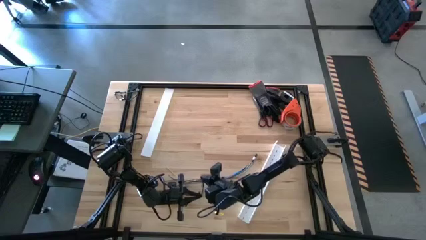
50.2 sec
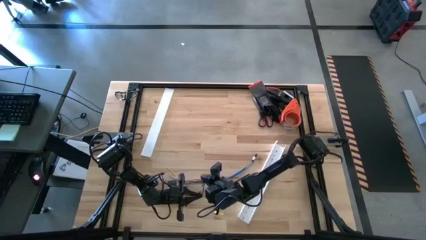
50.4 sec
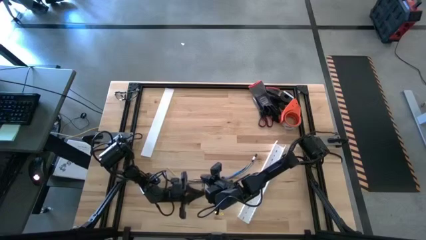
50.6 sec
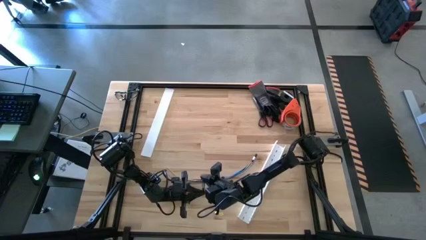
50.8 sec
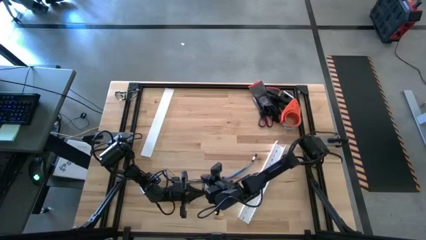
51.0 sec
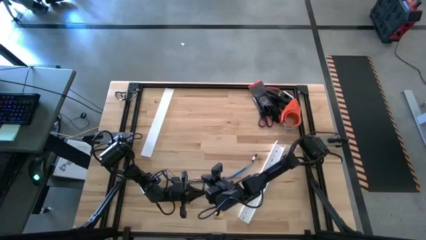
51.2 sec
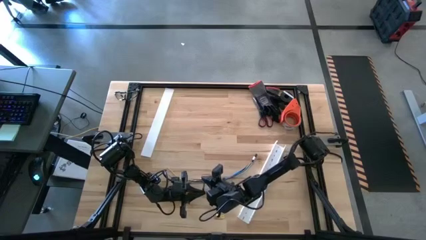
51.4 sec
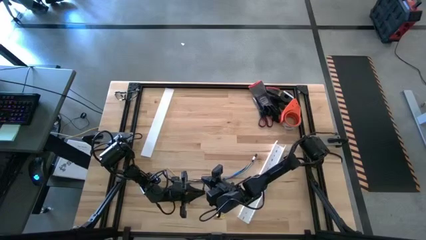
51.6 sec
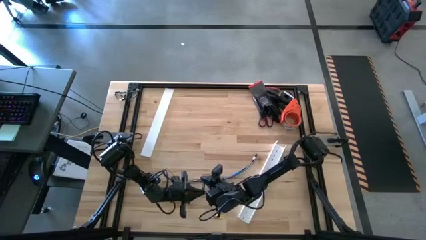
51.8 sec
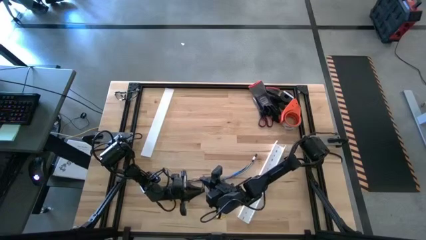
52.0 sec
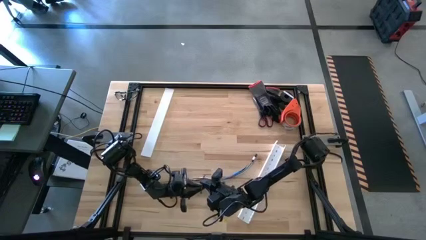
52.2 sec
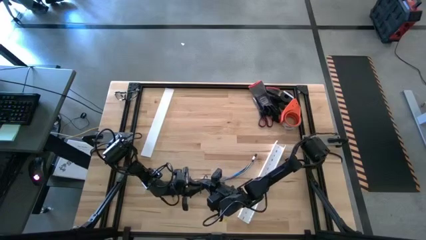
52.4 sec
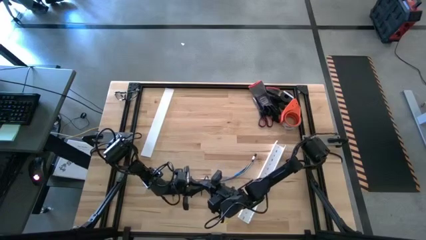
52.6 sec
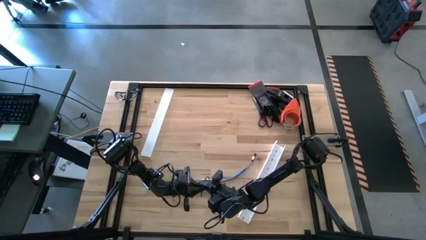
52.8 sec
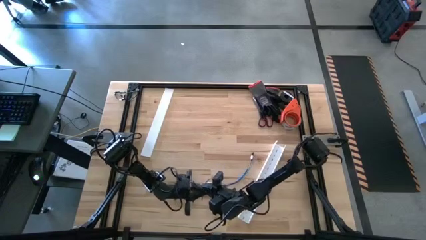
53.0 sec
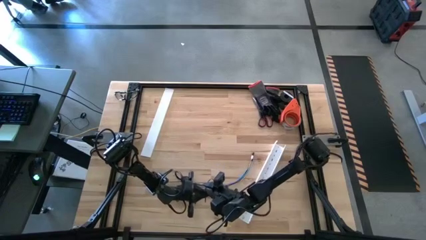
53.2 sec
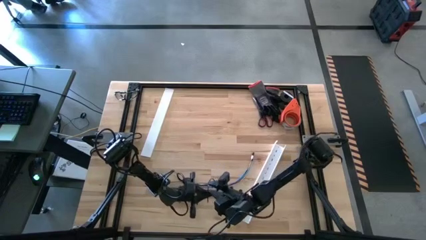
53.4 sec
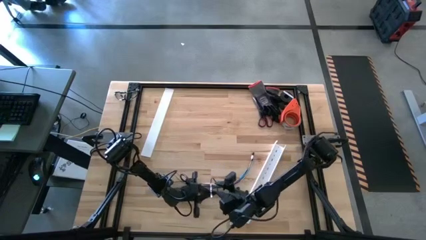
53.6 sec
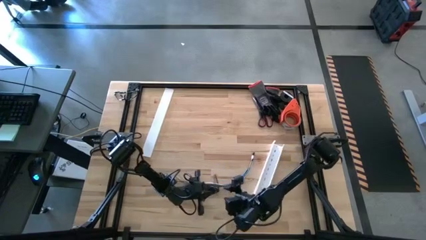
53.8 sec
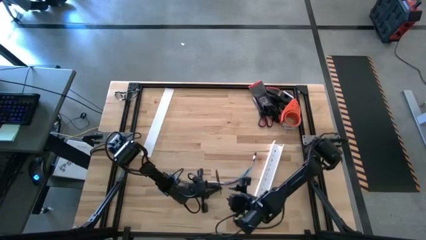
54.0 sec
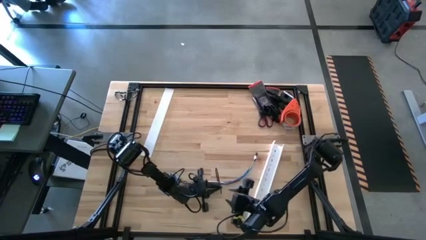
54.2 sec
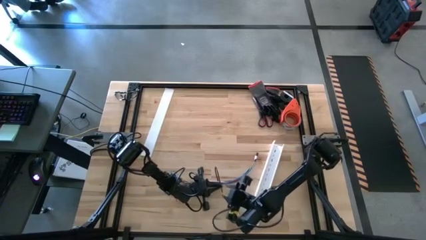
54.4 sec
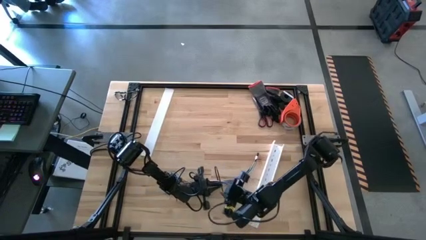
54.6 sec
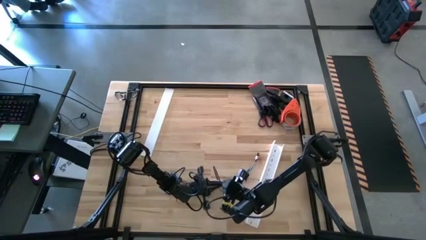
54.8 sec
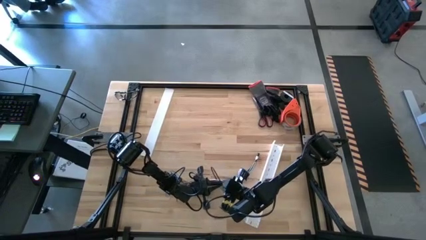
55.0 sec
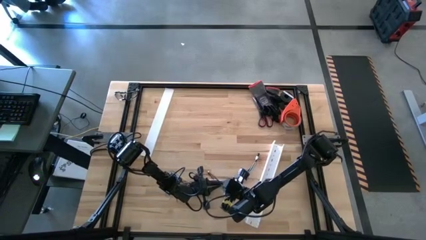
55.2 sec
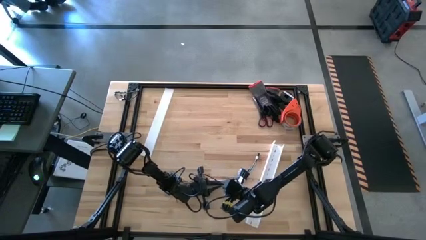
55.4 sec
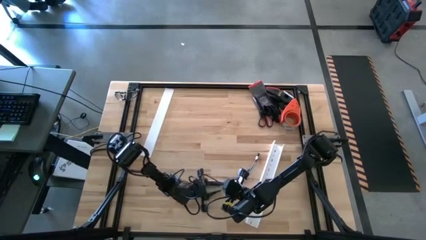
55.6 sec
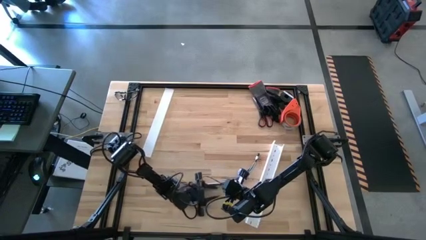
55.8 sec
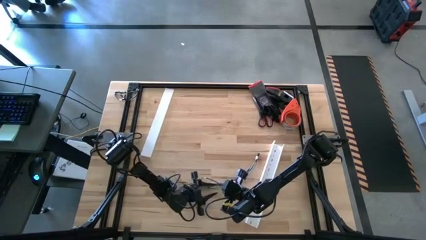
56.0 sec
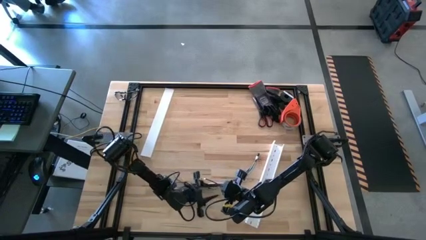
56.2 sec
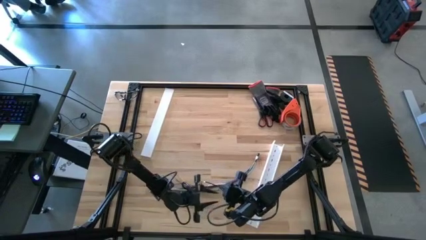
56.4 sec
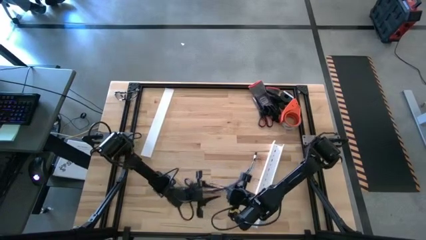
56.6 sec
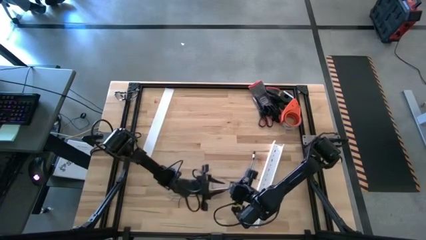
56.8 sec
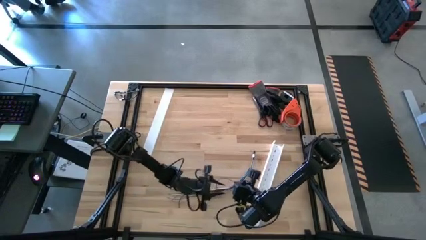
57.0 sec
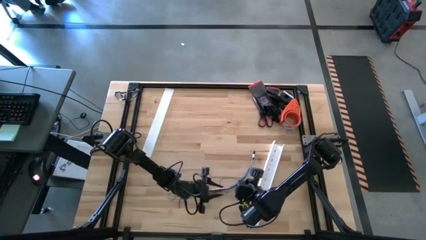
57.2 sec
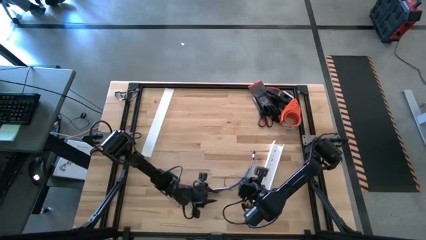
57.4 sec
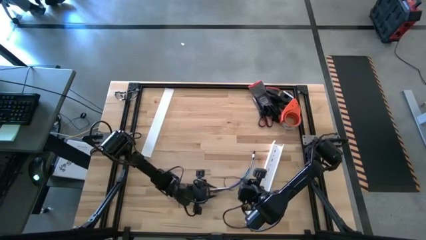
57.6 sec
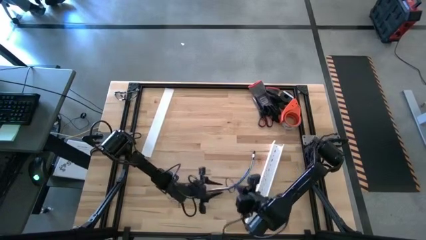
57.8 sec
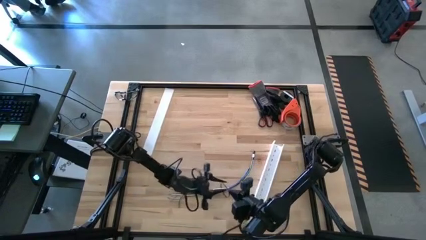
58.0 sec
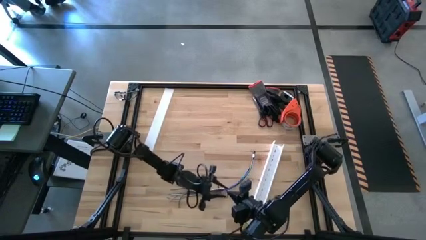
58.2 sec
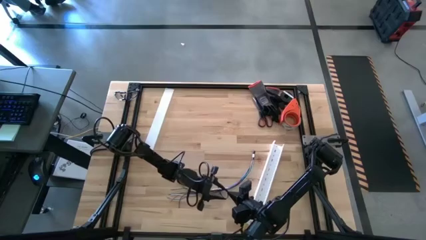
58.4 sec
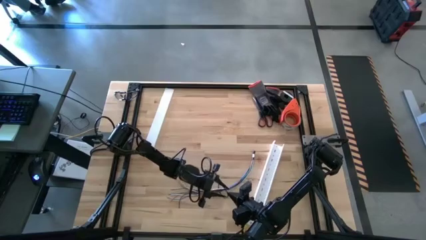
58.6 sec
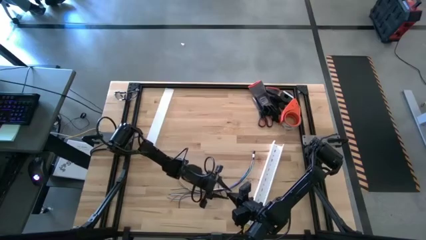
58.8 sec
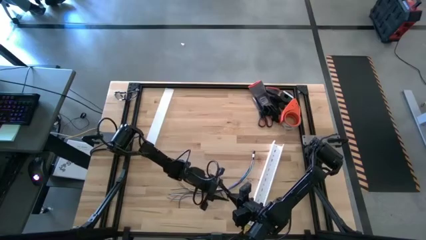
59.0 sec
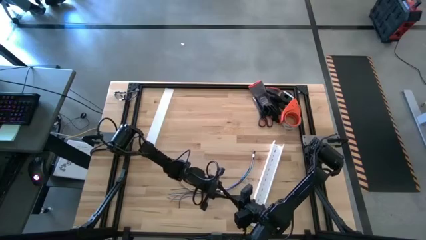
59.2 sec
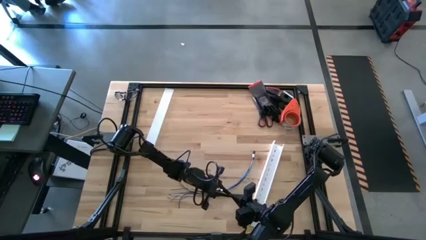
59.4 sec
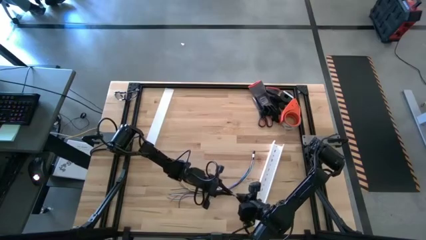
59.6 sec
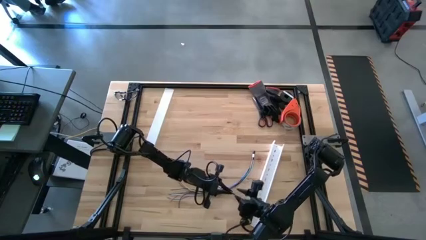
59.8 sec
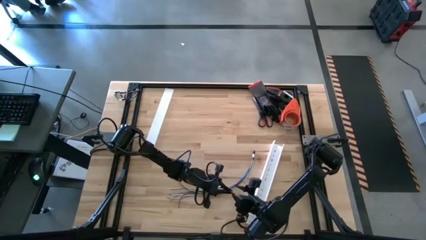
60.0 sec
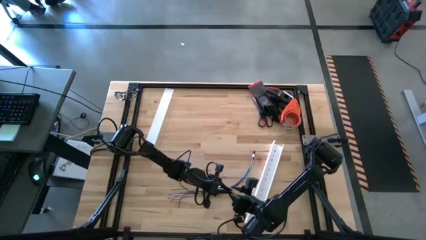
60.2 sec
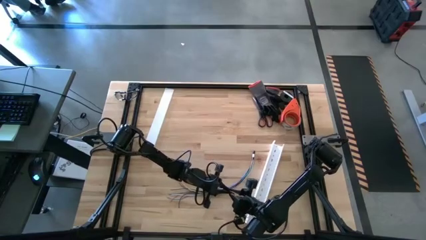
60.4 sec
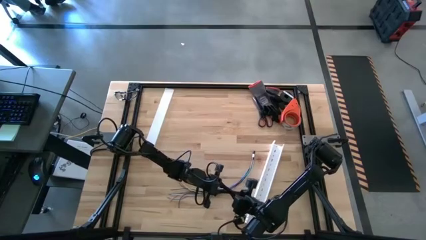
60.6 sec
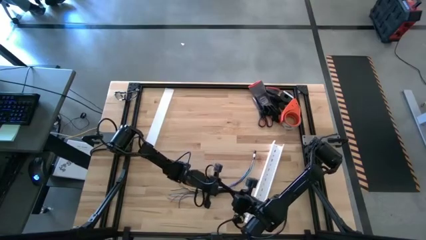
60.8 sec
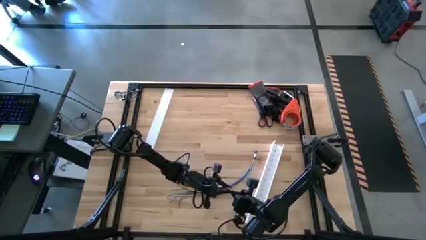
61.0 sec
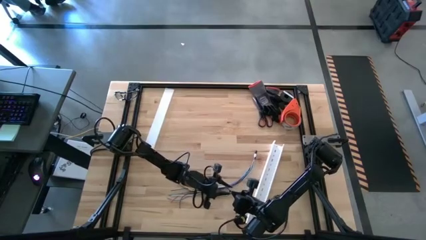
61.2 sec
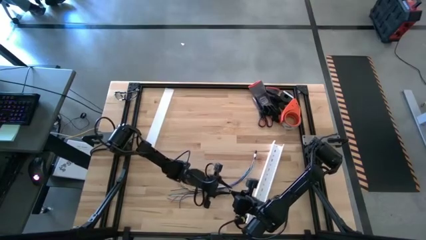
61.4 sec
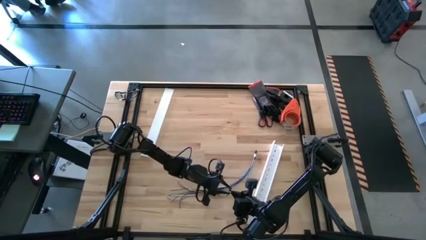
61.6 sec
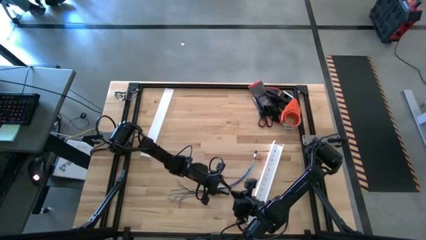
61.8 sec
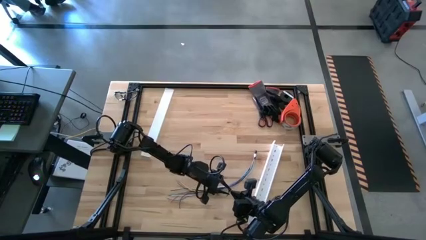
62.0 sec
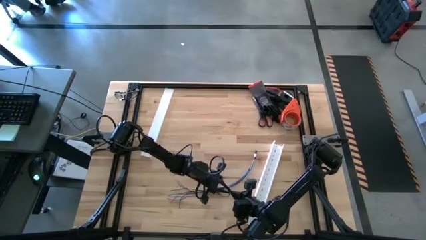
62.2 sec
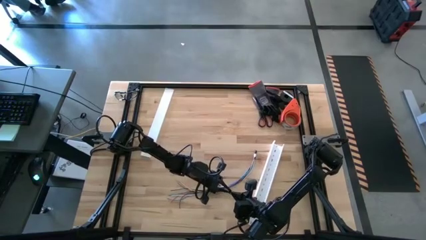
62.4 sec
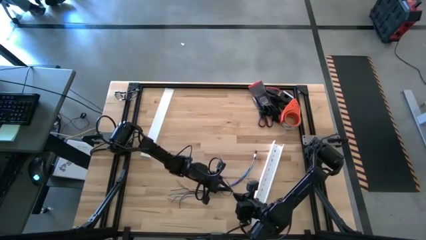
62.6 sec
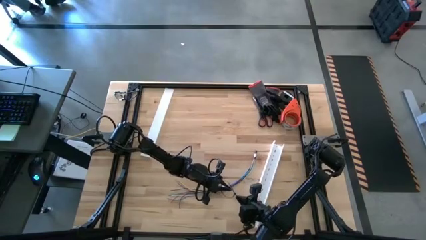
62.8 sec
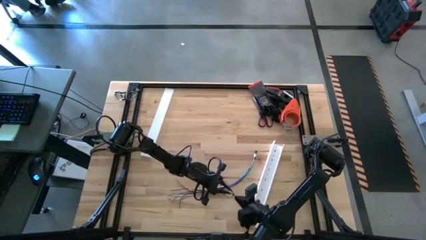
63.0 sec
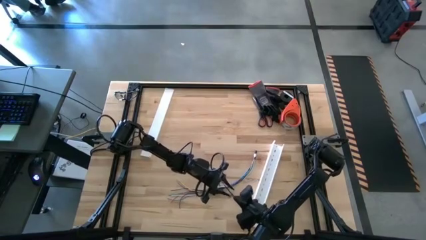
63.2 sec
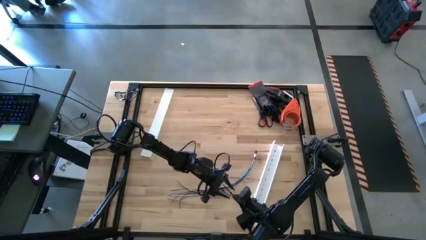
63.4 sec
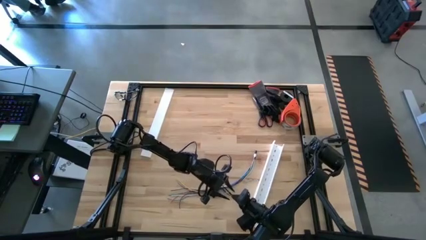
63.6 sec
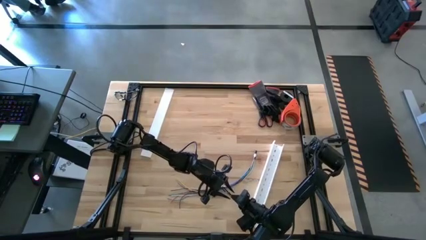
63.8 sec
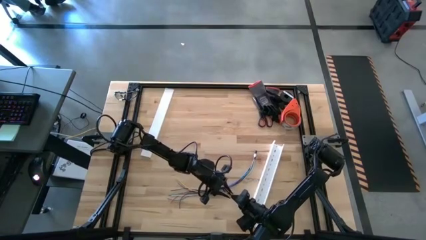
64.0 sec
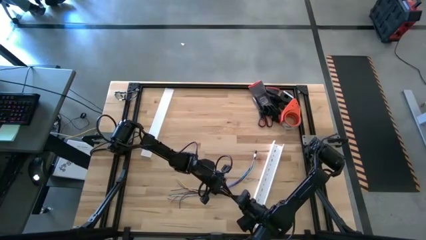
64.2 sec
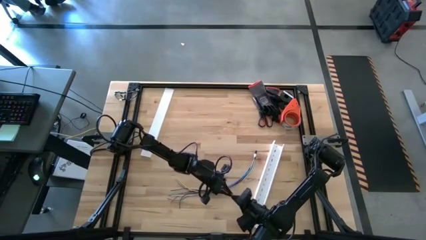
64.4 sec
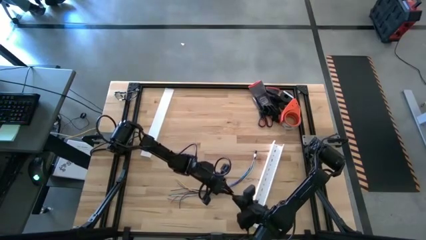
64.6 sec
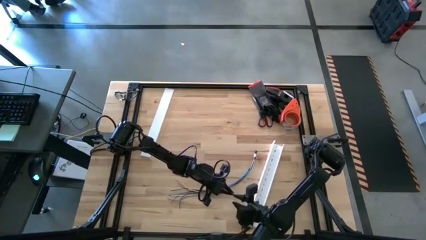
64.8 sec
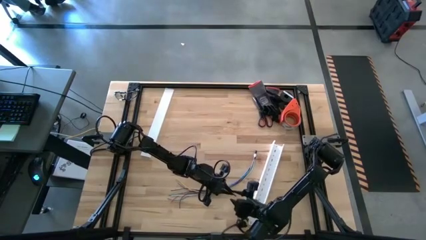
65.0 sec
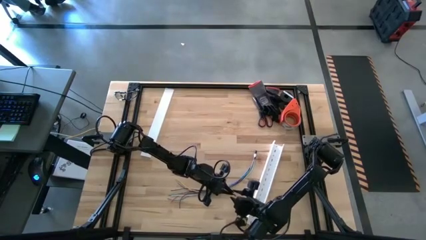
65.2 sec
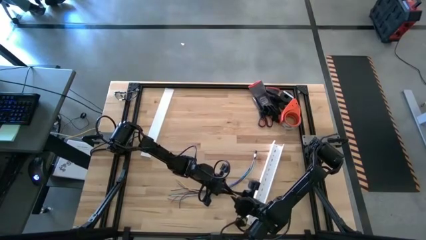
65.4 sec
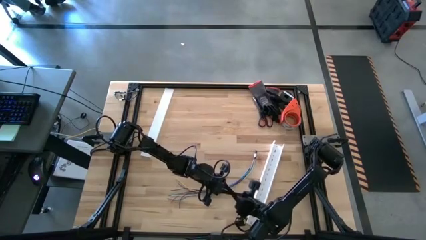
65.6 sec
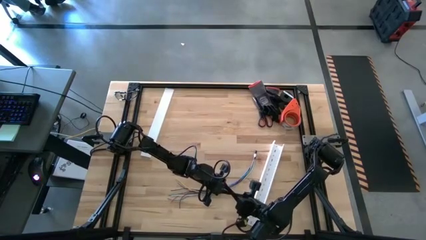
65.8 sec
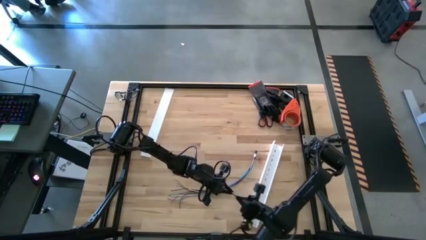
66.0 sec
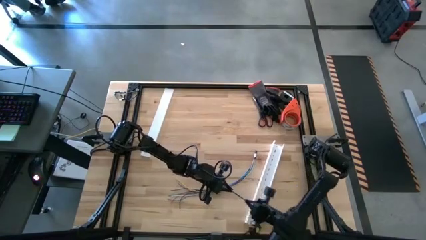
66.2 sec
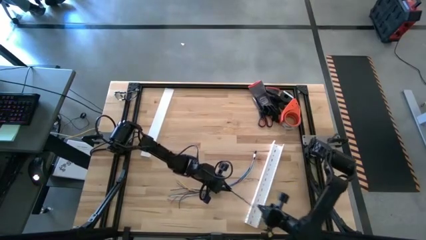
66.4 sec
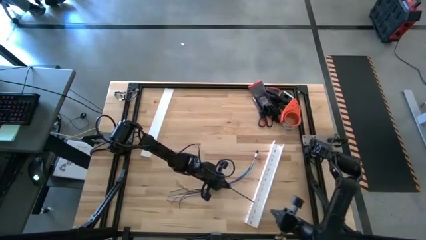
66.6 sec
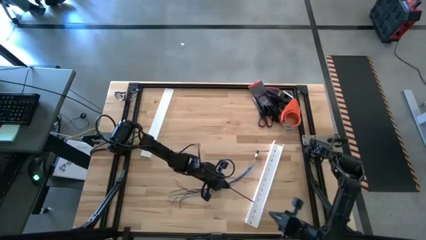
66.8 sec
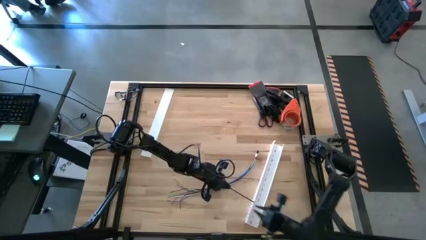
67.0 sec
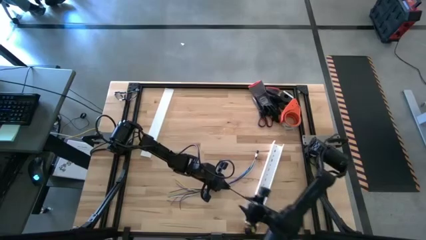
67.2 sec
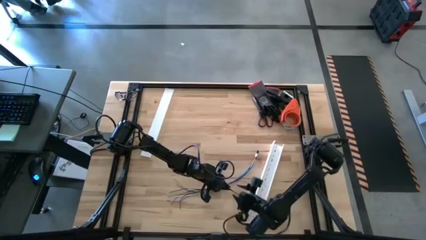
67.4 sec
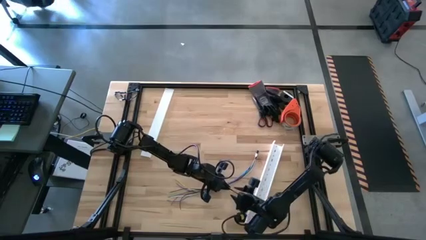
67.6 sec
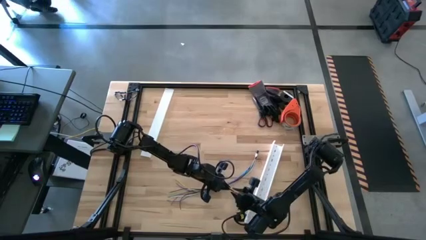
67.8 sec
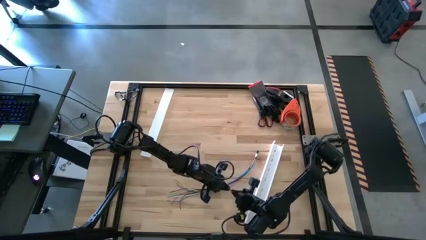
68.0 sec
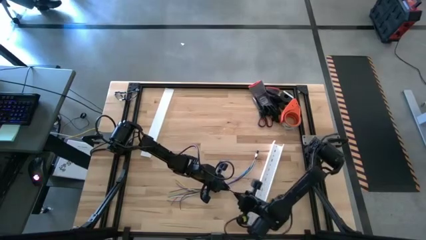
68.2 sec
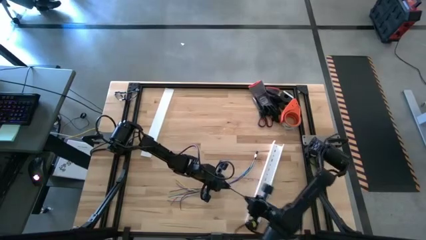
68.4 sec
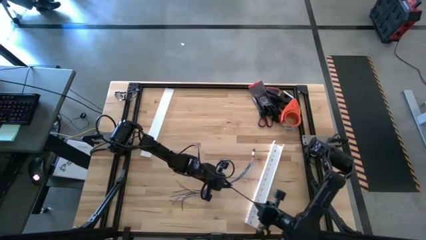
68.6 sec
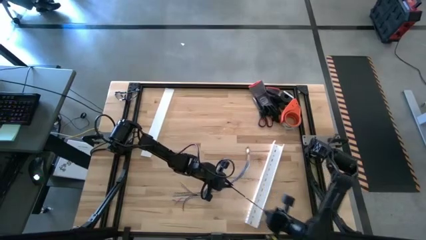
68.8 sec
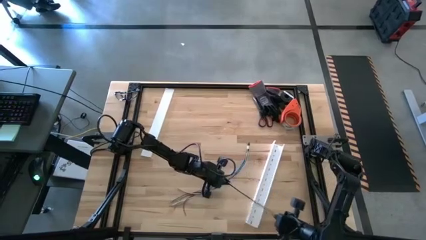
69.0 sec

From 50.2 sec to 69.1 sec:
Task: Ziptie cables
Wrap the colored cables with the black zip tie
